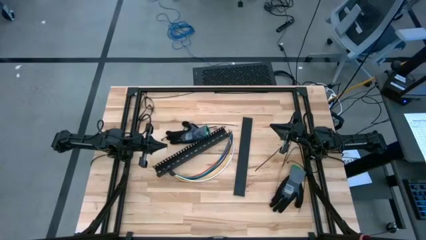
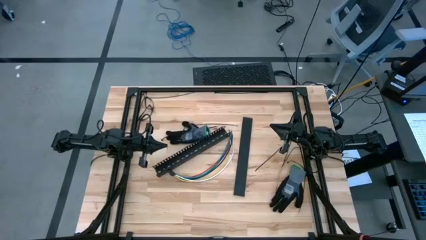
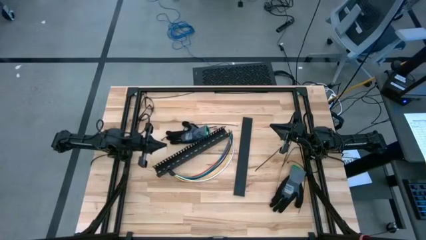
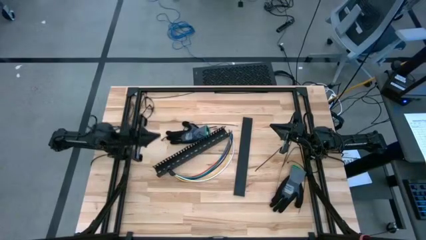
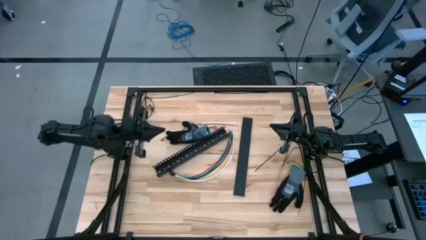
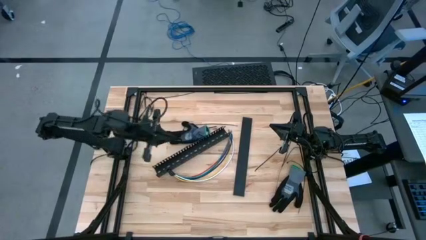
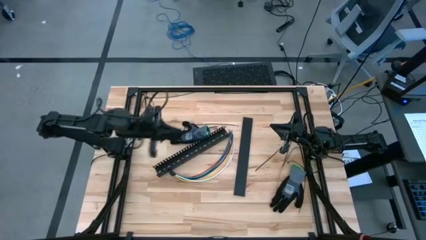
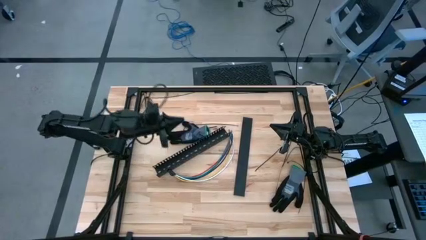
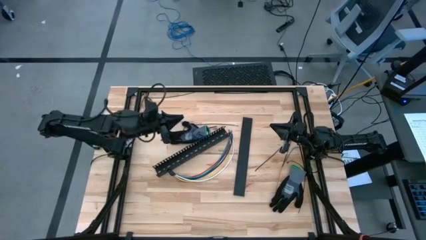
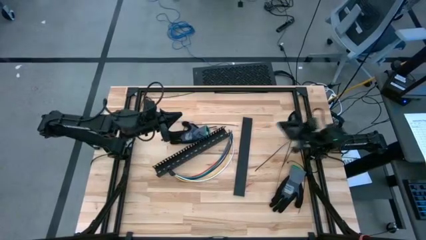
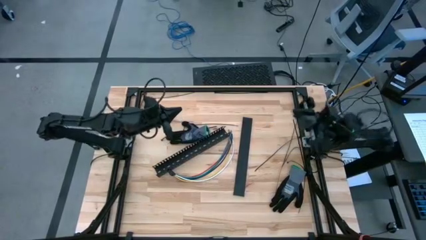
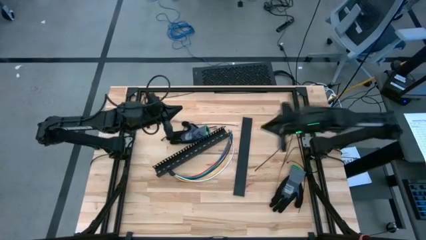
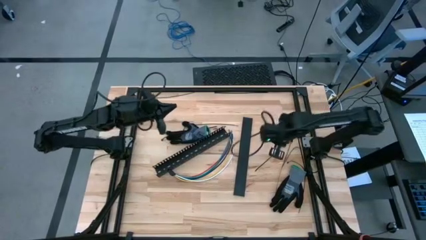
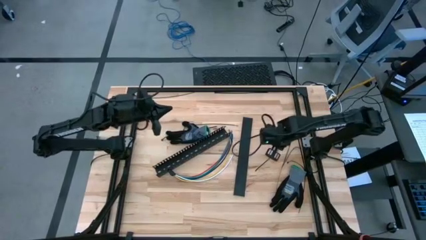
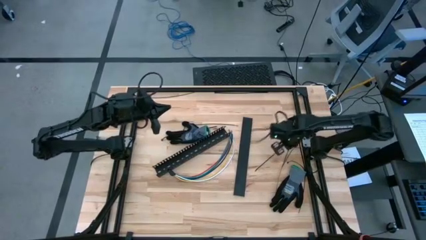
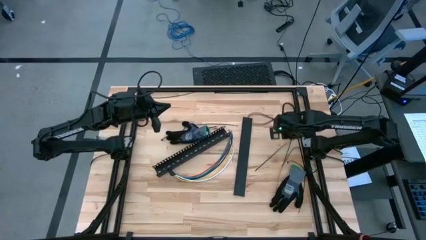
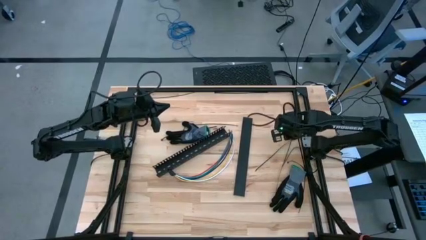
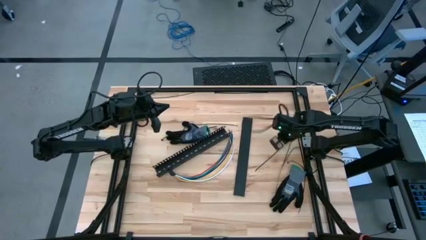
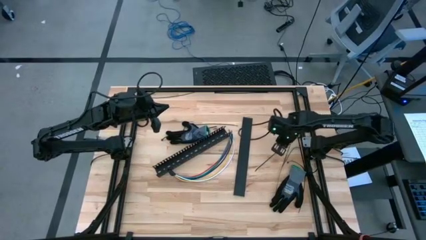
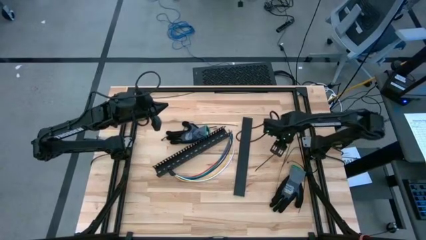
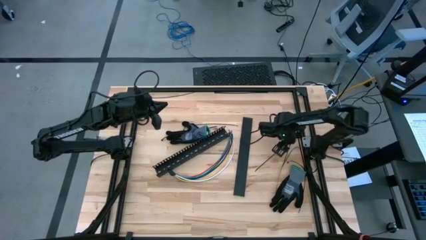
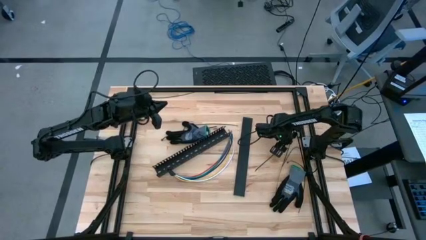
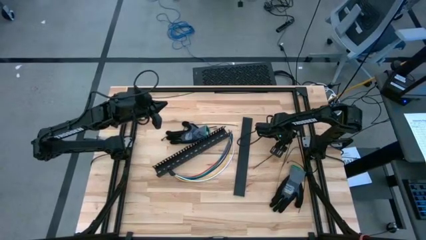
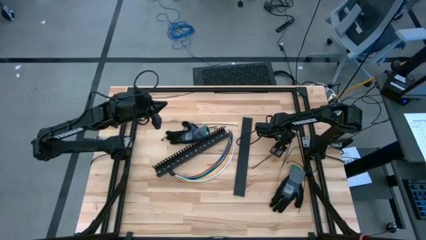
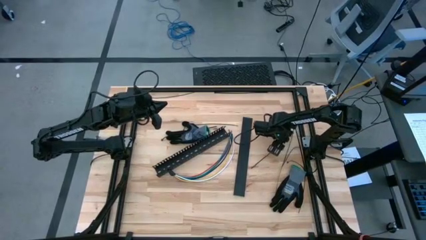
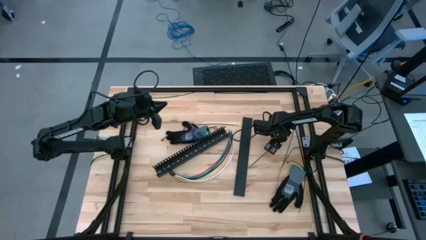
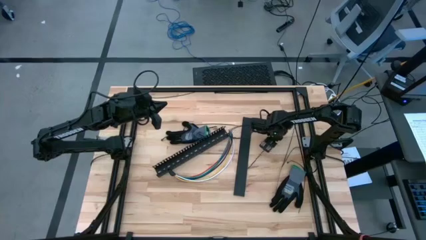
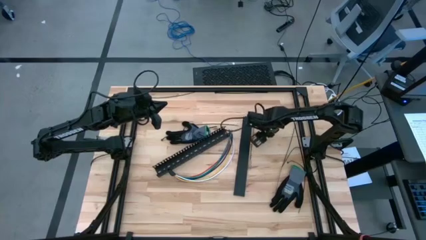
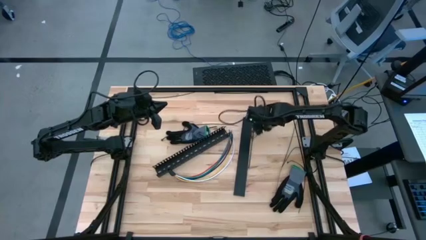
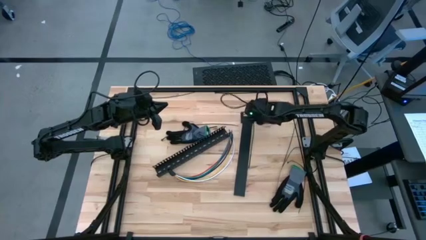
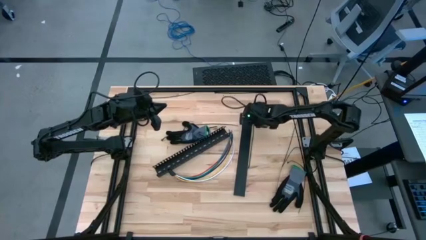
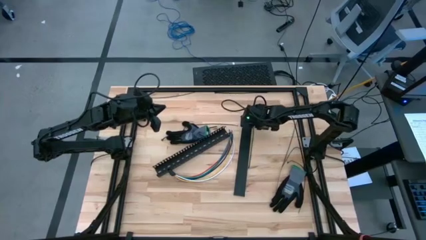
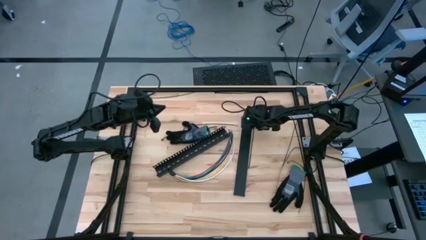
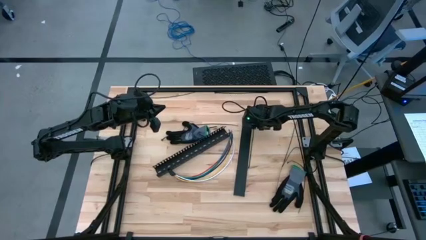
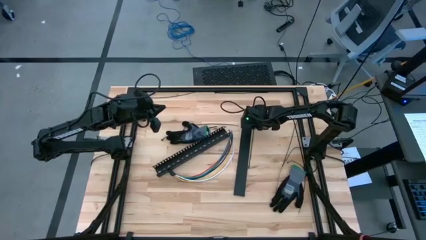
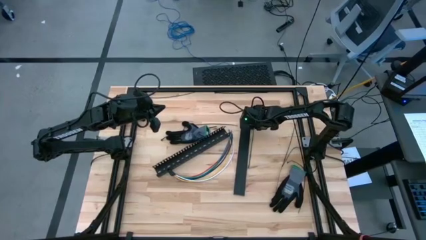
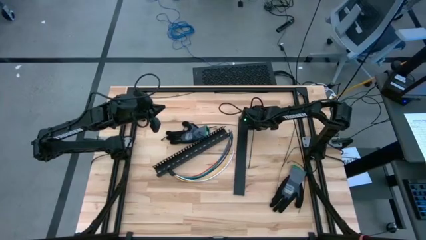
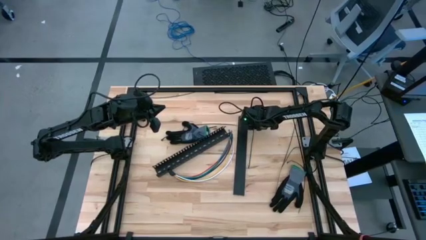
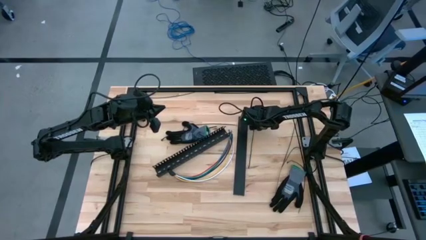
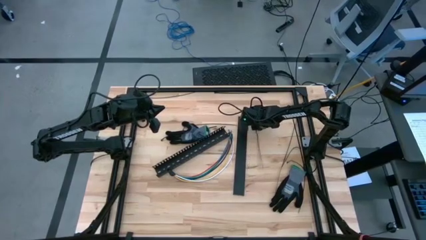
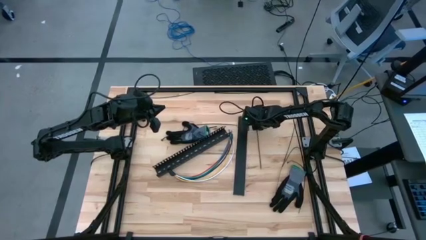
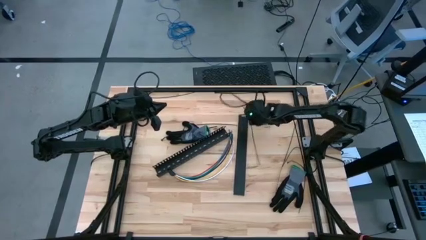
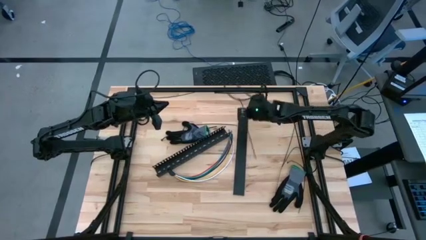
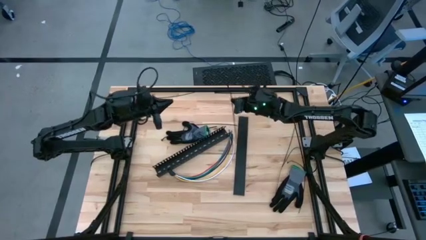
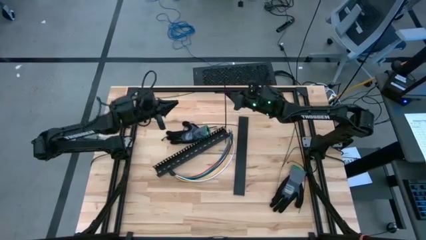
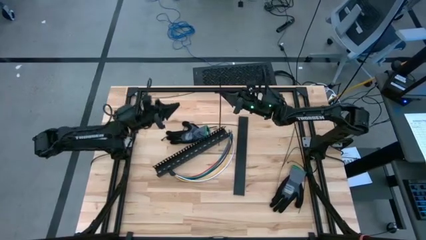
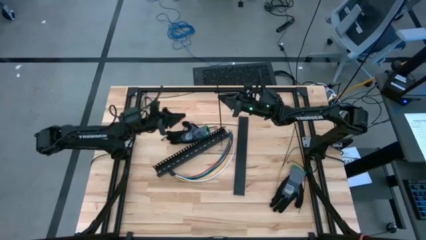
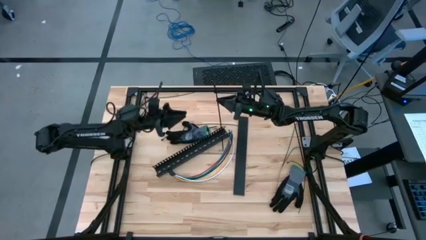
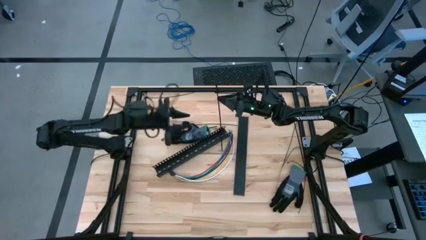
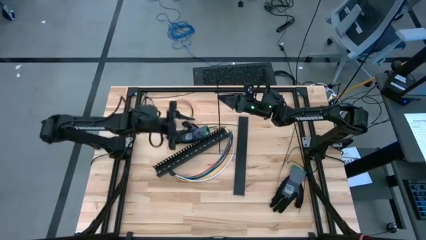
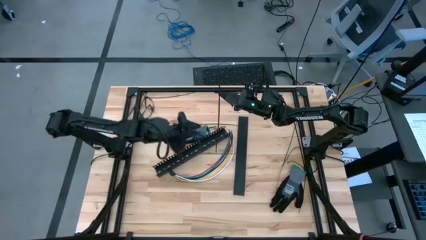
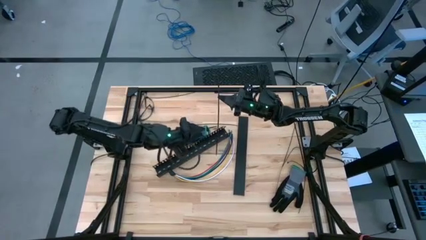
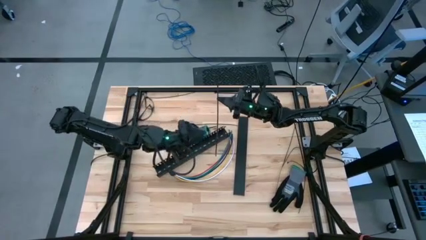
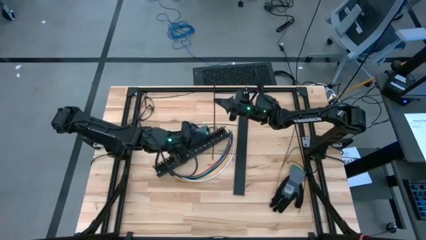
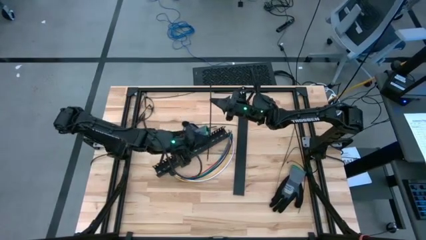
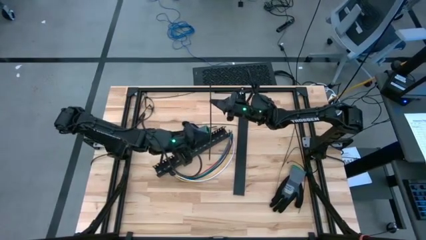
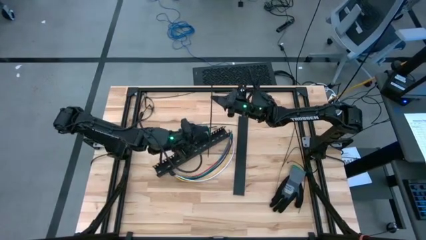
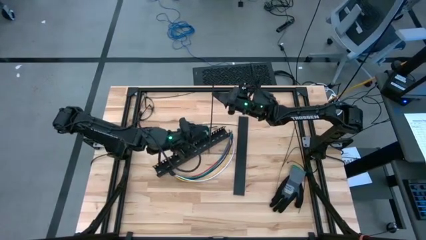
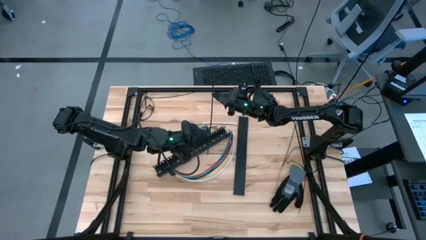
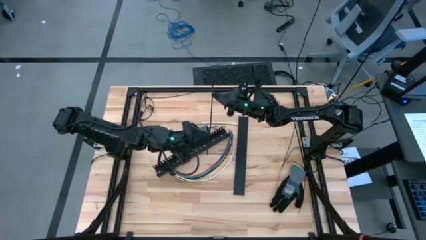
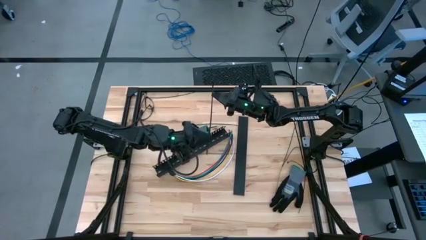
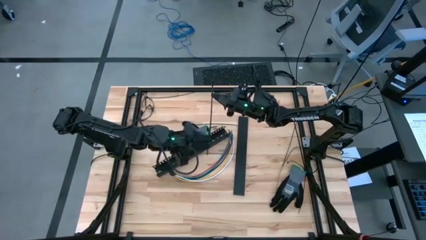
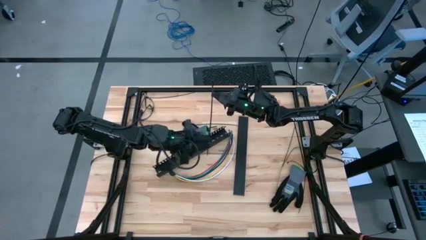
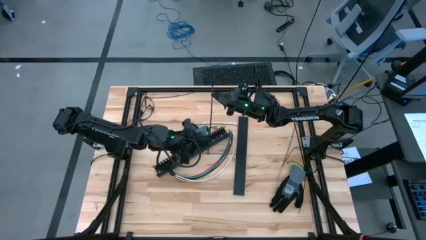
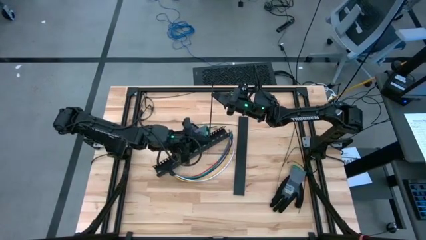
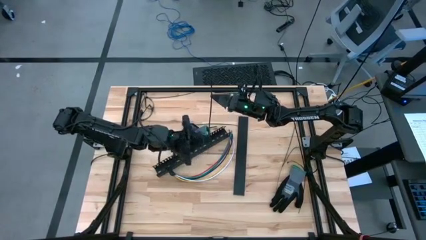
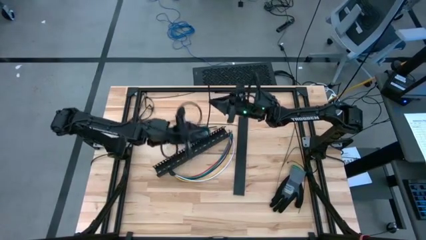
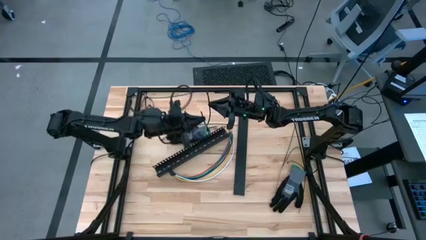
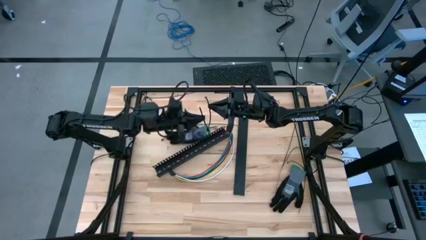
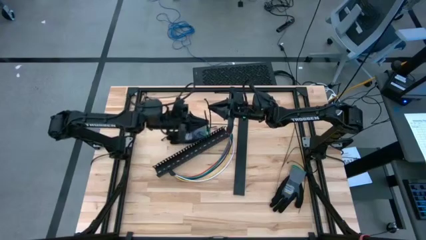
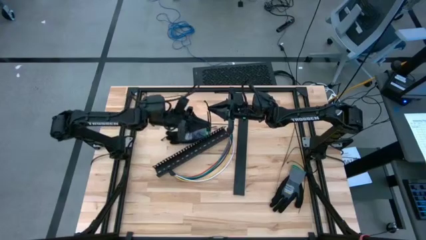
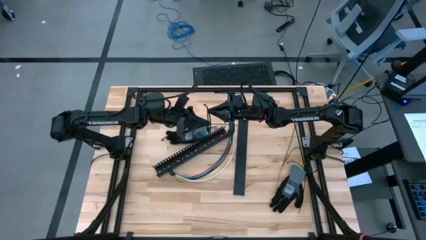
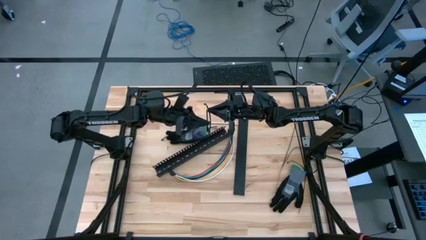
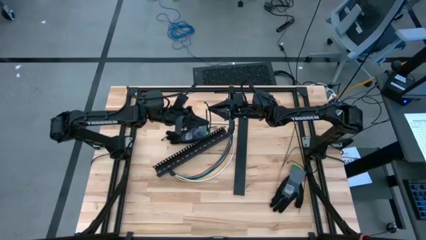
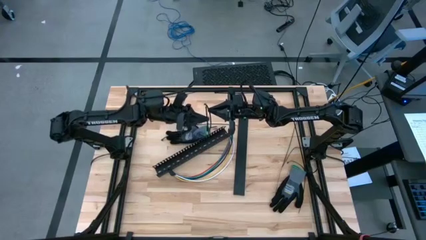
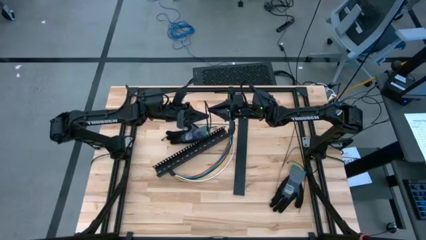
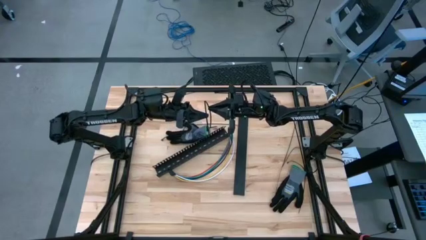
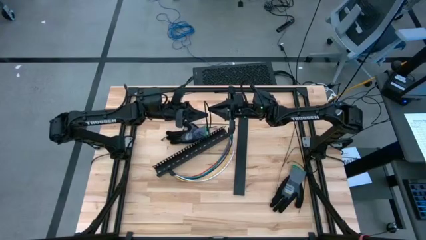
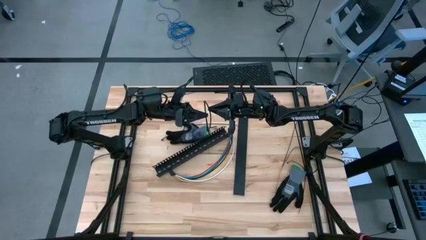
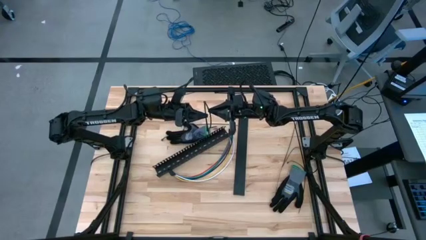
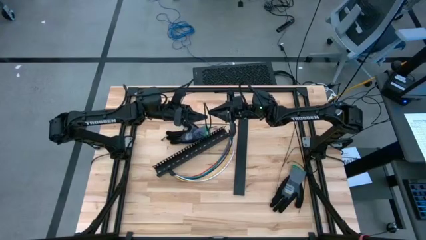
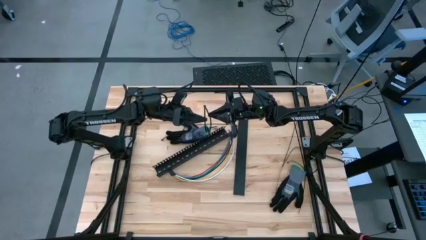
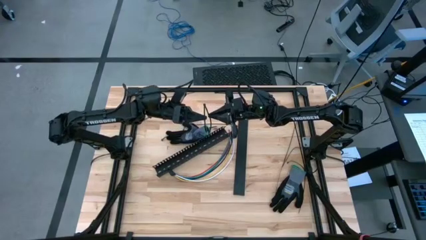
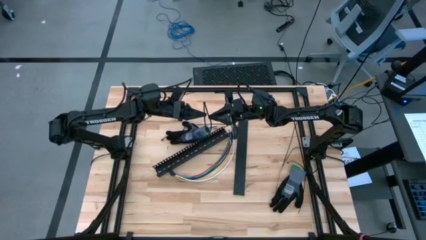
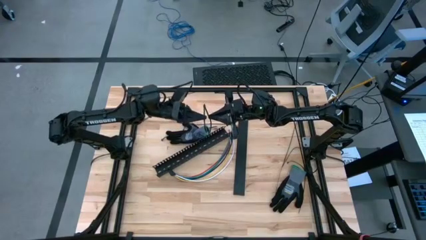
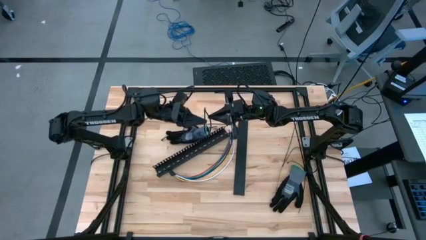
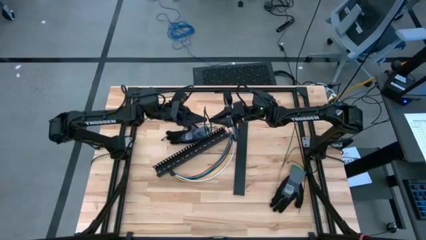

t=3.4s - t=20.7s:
Task: Ziptie cables
Wrap the cable wires with black zip tie
